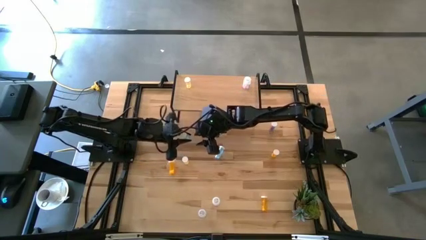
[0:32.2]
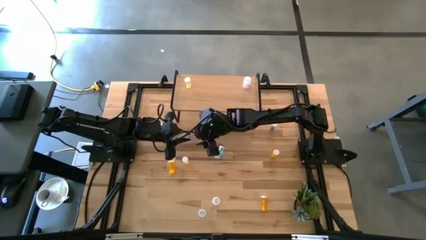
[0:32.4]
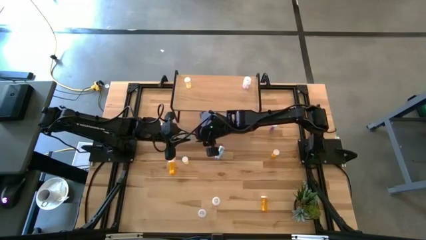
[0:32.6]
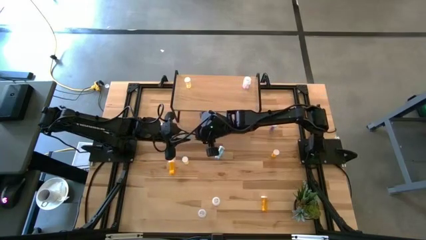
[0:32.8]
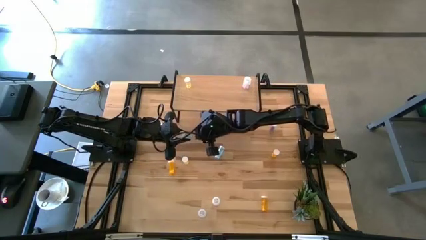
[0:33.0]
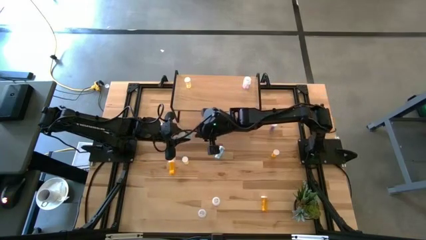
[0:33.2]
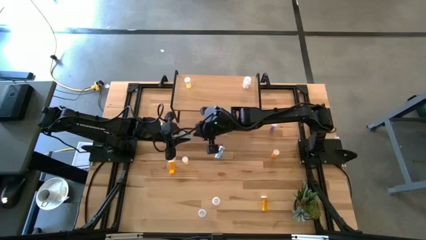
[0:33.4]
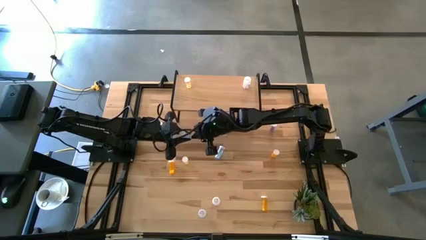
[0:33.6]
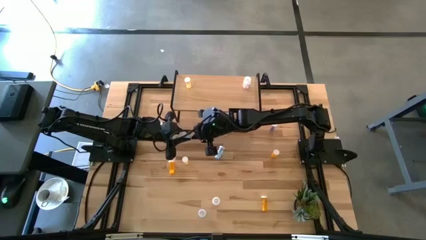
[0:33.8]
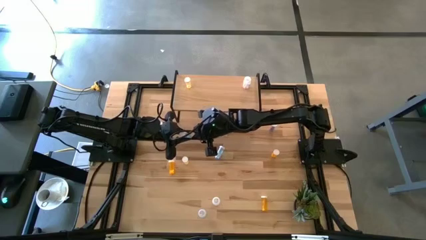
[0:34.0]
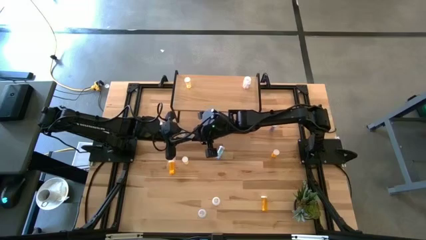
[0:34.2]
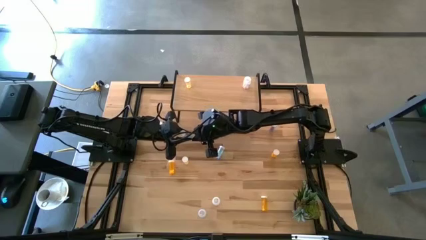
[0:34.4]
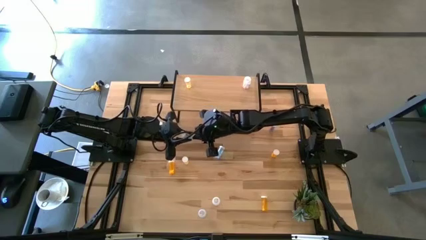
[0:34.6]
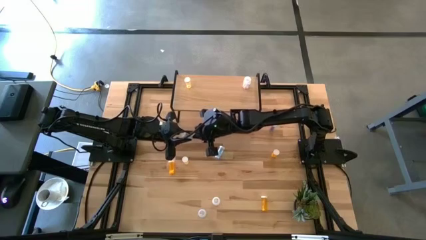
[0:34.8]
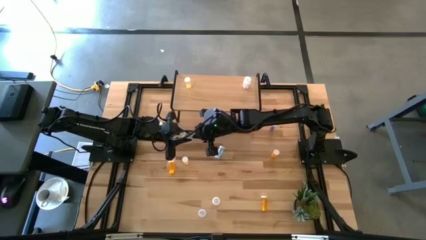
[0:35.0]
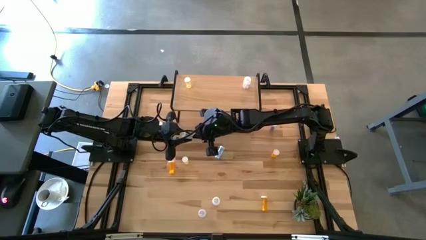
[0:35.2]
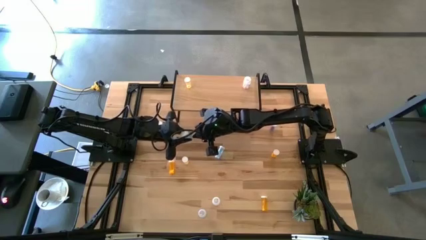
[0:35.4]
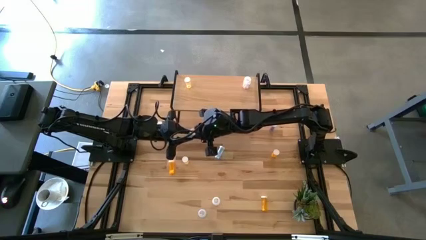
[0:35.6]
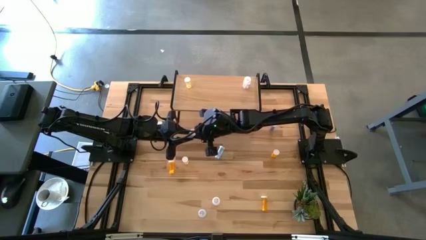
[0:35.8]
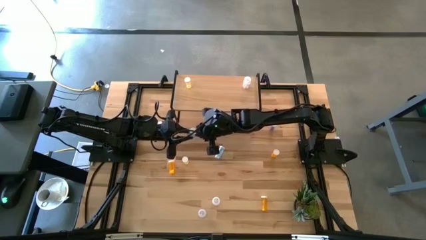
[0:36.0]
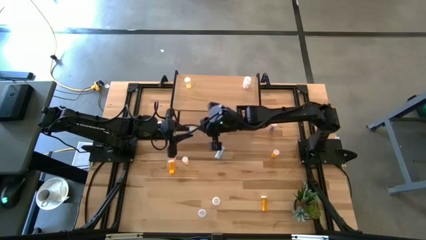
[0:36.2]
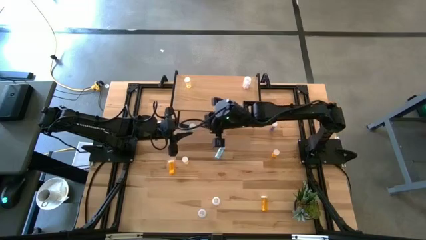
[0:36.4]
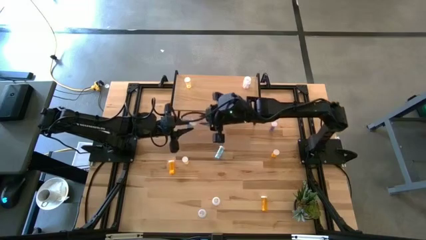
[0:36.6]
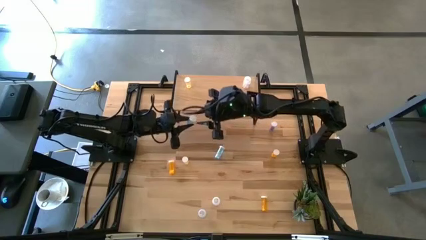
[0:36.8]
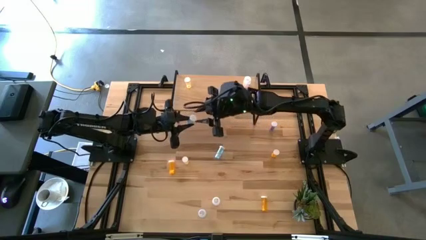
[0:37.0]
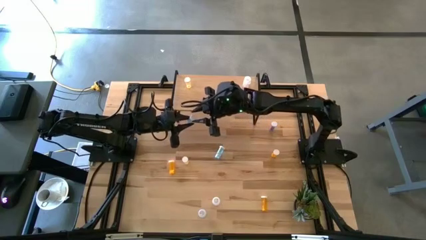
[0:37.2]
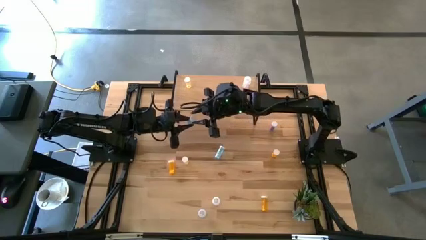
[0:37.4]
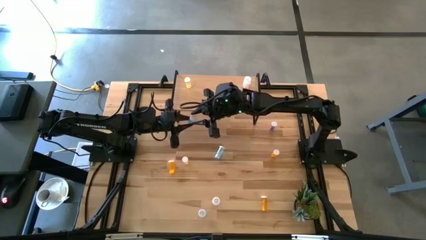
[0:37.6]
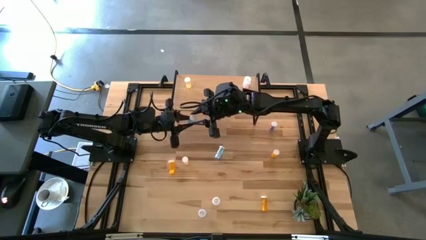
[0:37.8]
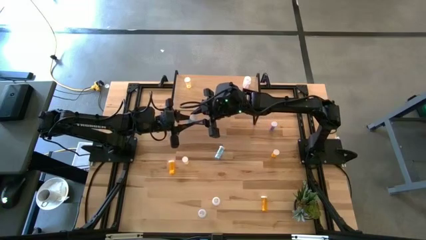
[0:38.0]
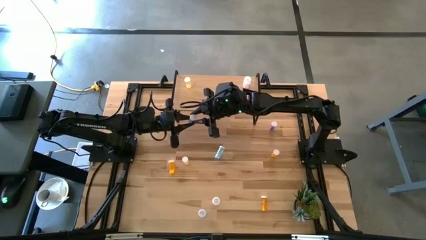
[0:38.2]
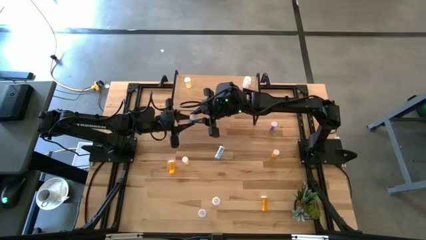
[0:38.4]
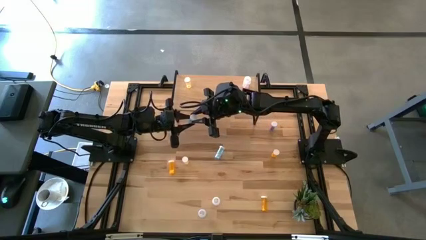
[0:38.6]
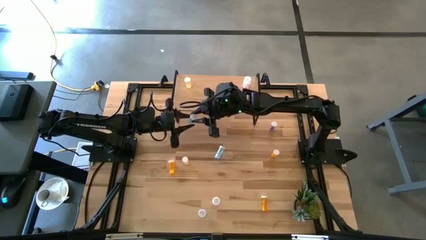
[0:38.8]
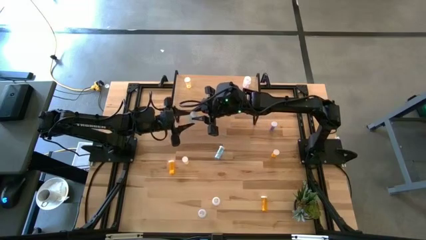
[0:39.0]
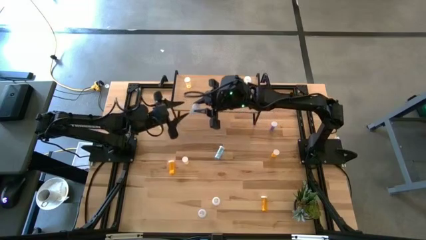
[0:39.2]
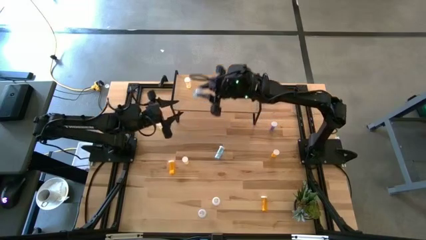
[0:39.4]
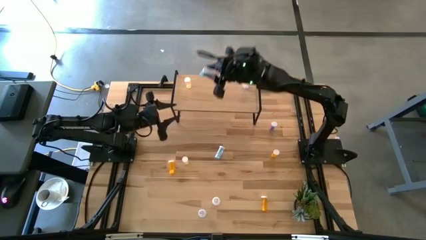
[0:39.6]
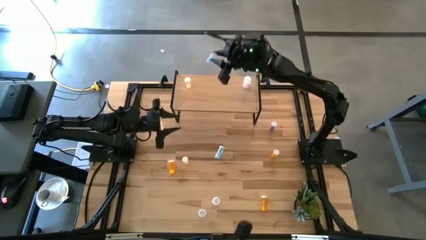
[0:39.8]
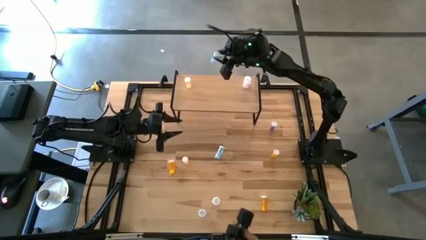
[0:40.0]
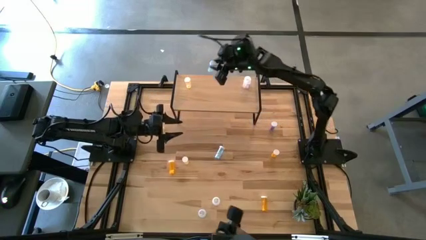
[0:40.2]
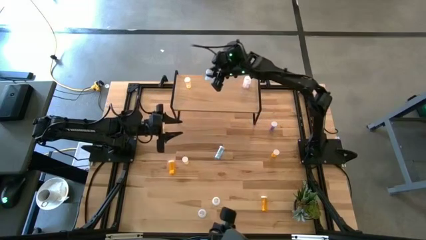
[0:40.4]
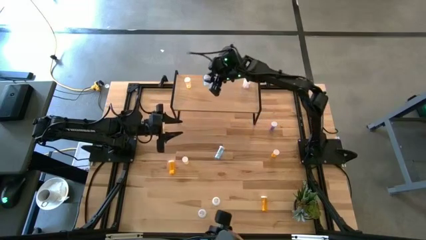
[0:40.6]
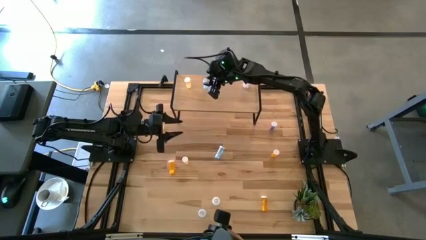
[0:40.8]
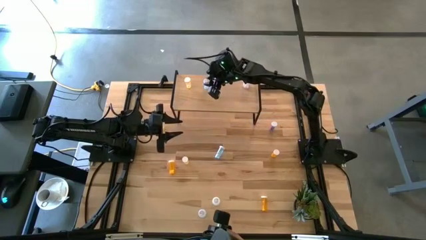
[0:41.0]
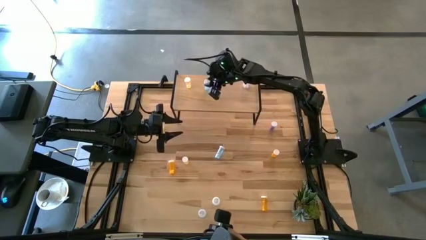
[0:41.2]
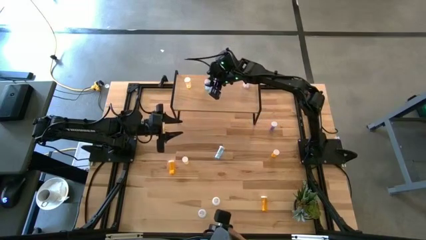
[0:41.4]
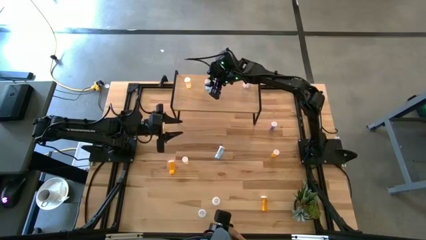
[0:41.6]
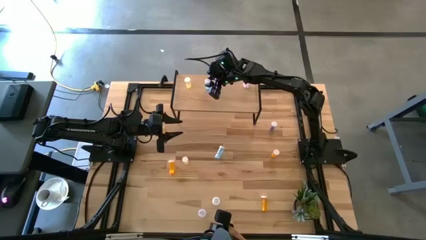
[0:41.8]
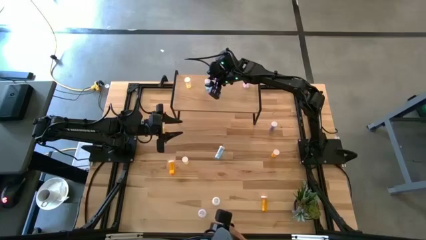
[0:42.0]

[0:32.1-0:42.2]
Task: Pick and place medicine bottles onto shelf by color
Put the bottom blue pill bottle on the shelf

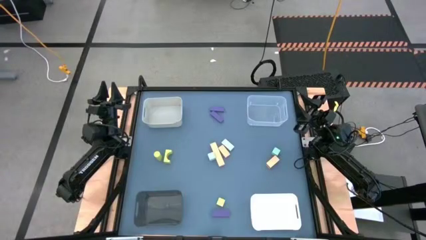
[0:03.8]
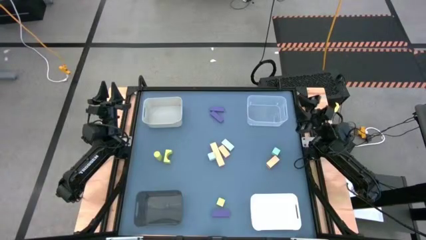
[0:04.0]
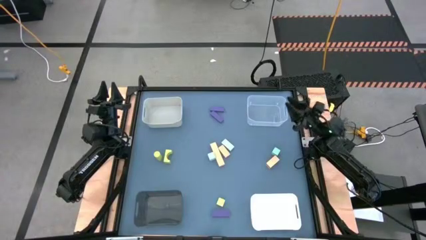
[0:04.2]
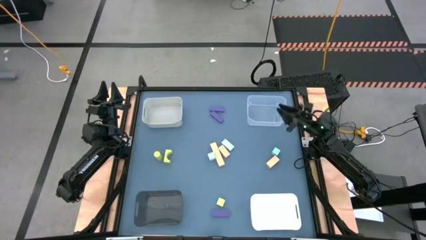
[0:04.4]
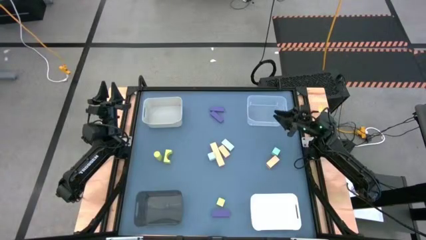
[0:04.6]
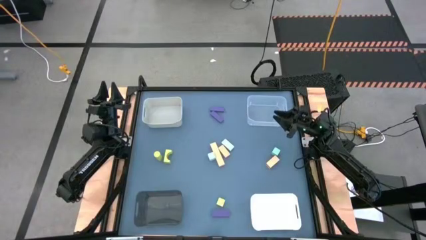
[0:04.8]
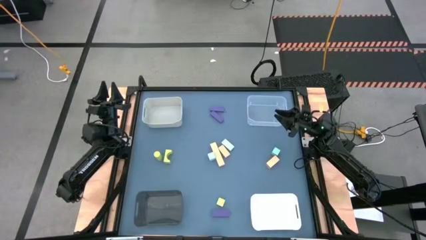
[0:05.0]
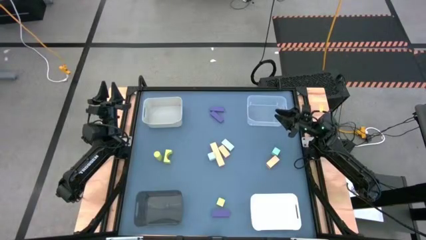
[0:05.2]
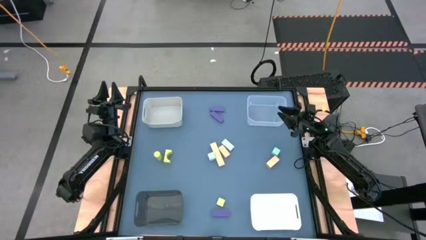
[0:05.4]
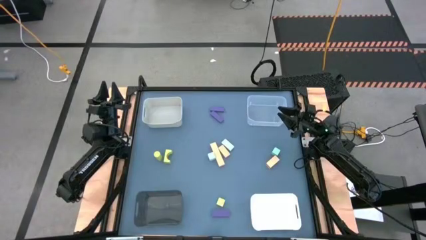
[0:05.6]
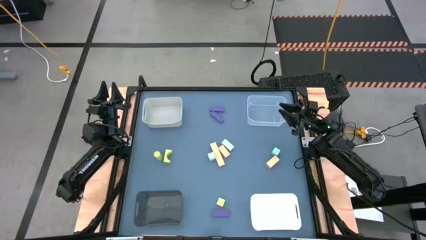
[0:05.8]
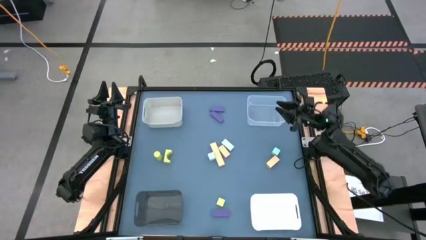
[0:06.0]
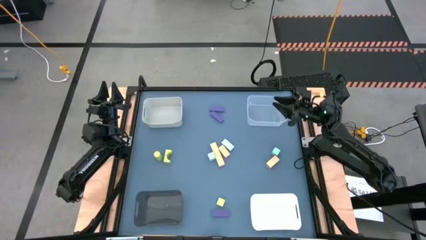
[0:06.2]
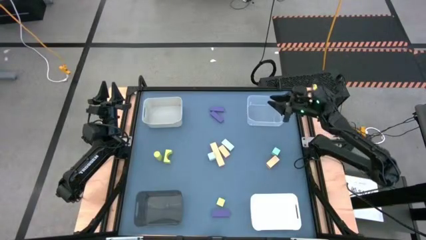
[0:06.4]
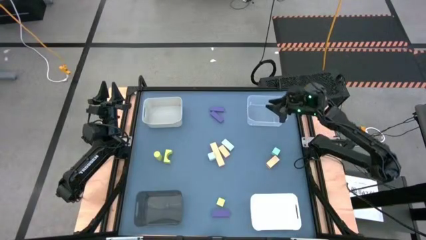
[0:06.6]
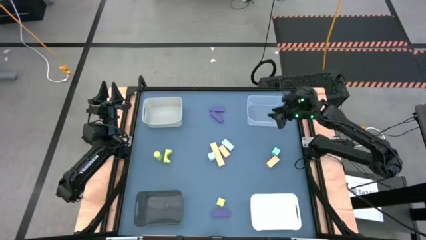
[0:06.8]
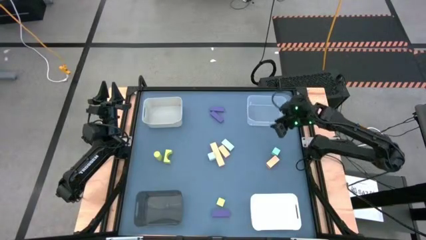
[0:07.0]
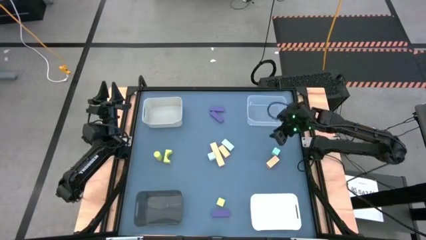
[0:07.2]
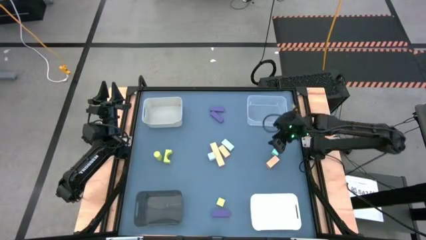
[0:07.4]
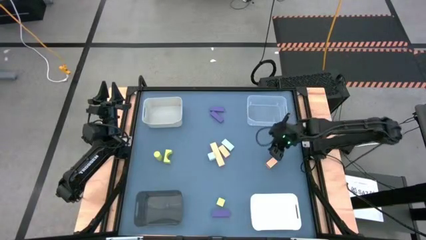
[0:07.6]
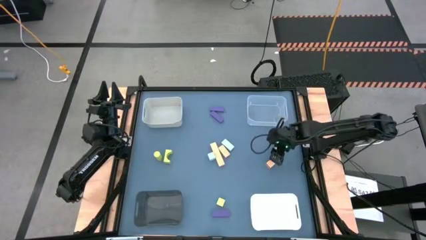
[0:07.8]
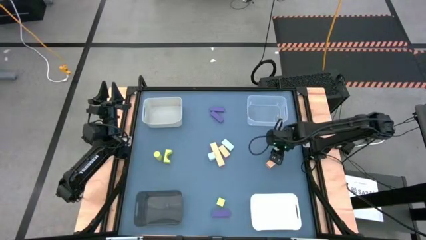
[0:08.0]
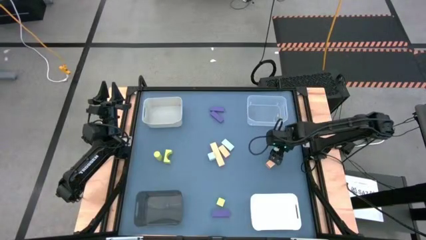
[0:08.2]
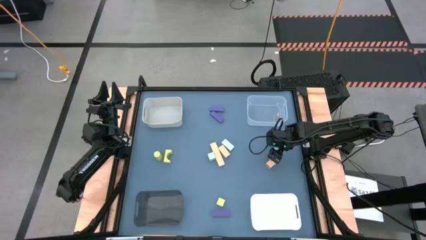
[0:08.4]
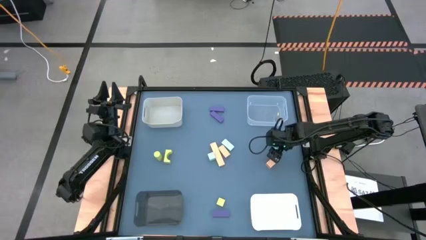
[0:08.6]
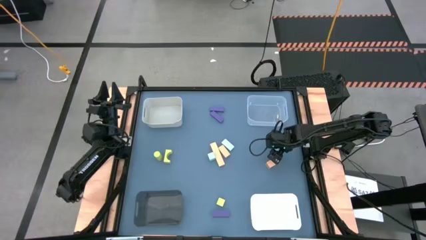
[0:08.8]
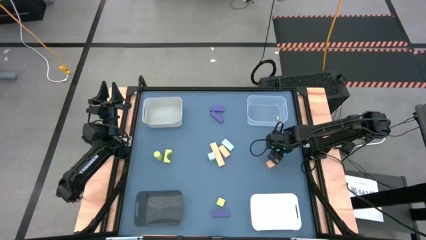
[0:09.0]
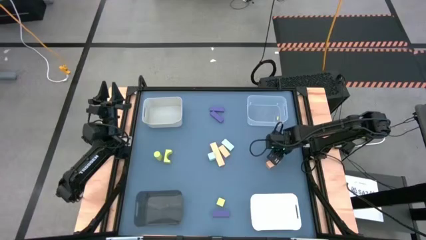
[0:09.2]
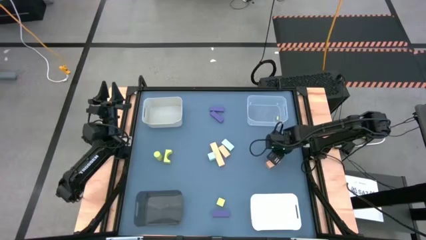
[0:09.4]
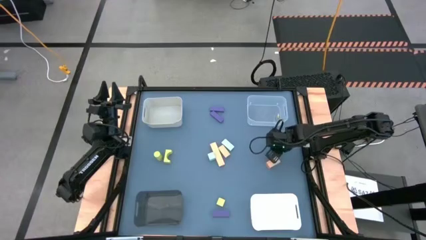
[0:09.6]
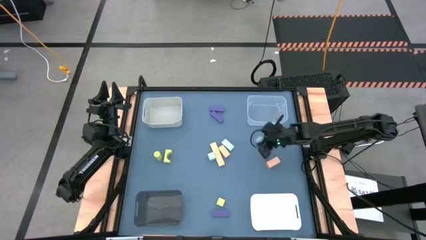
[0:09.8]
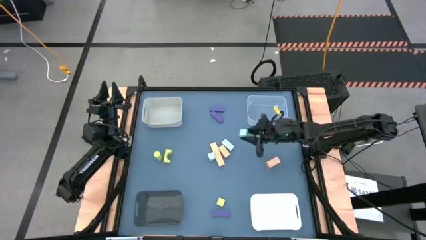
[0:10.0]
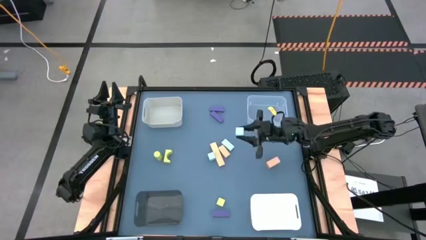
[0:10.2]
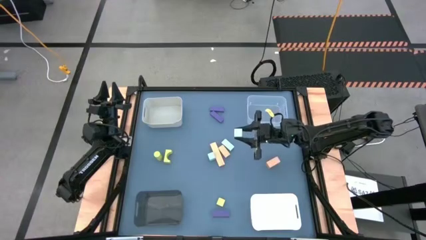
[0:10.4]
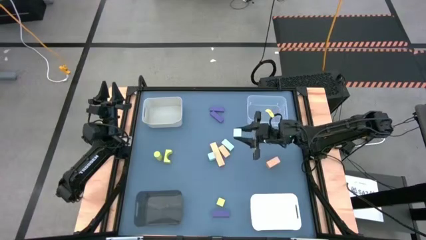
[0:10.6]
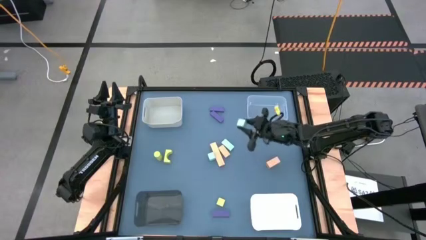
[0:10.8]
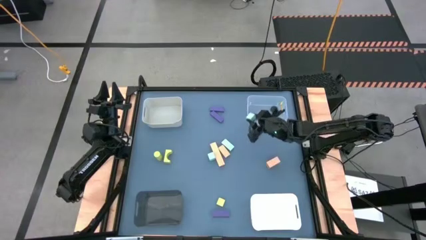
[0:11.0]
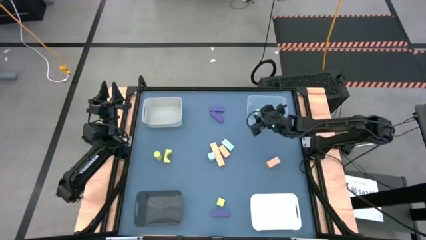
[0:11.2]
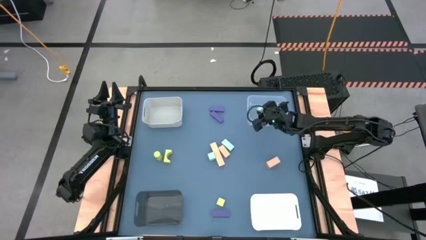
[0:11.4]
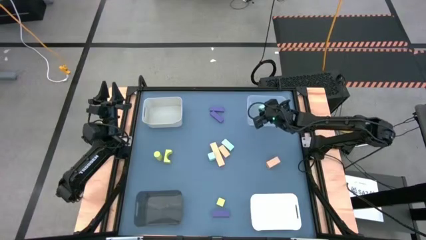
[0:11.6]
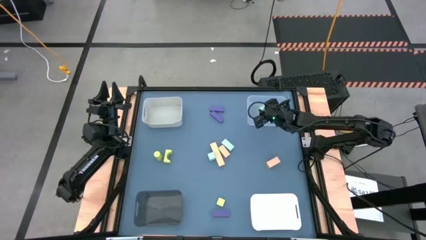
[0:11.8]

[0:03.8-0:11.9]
Task: Sort & place blocks by color
Put the blue block into the transparent bin
